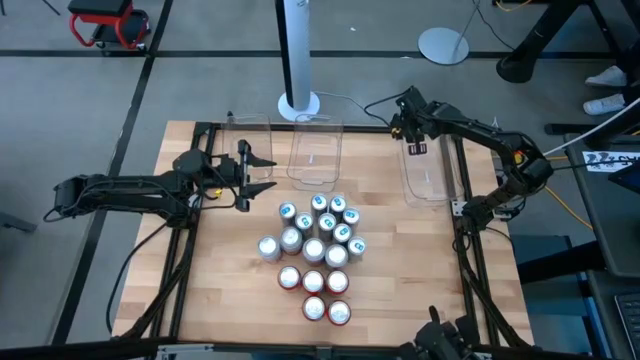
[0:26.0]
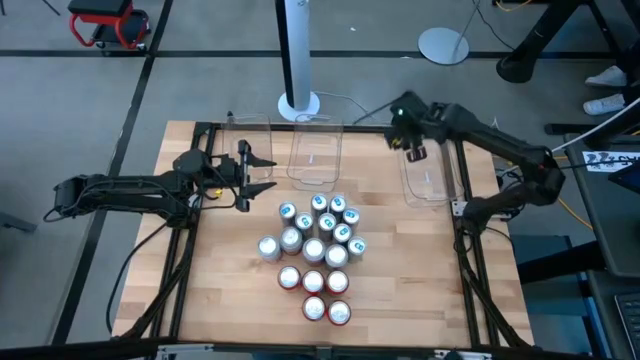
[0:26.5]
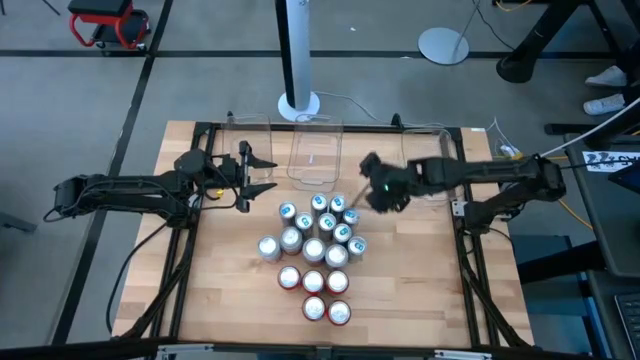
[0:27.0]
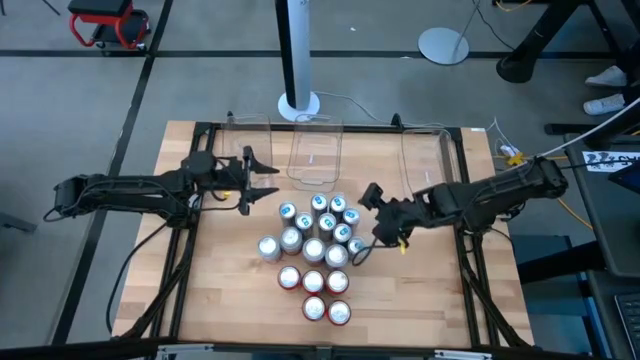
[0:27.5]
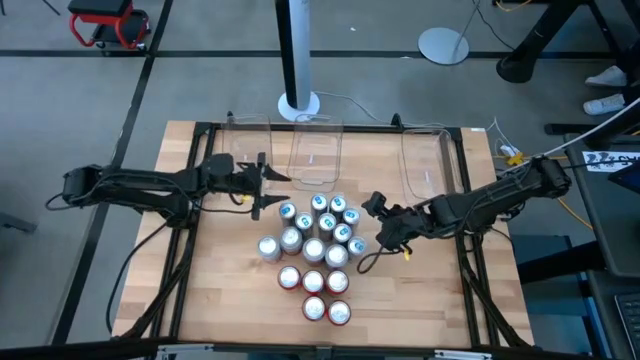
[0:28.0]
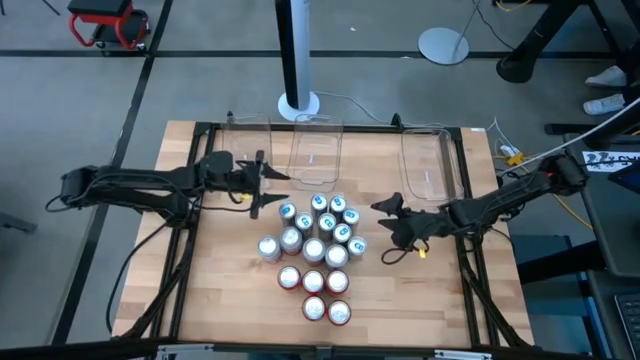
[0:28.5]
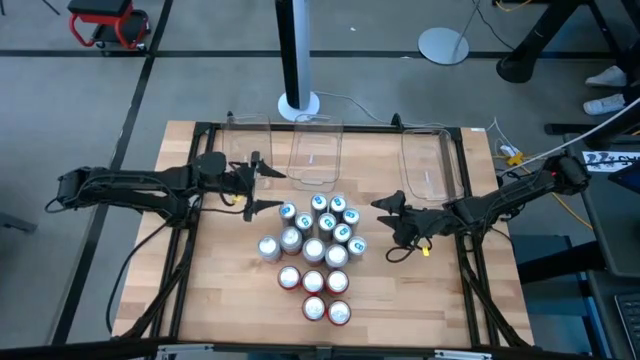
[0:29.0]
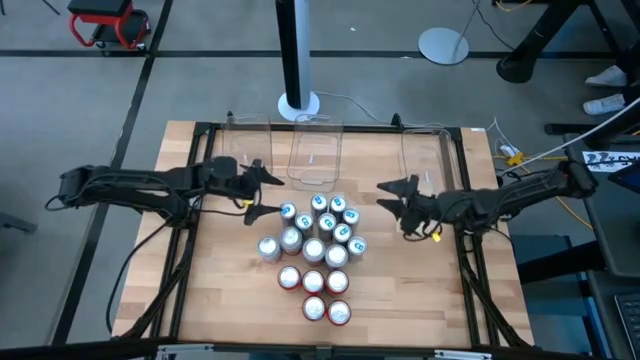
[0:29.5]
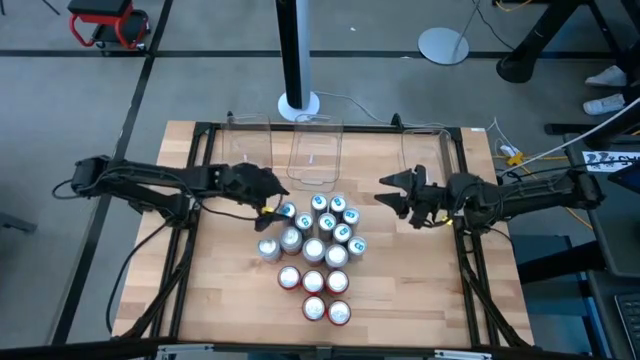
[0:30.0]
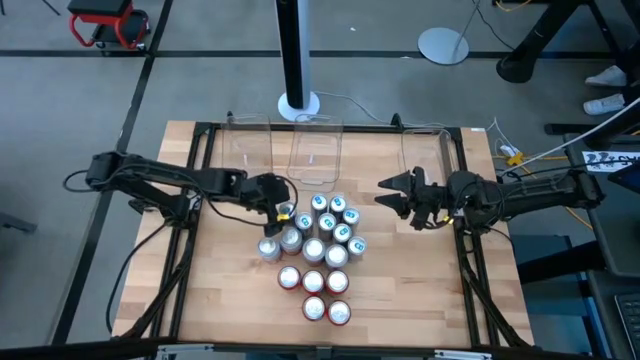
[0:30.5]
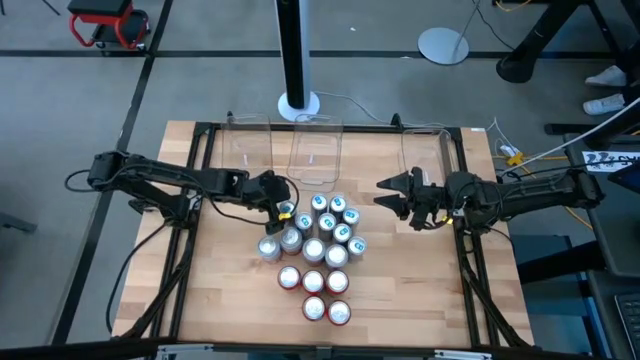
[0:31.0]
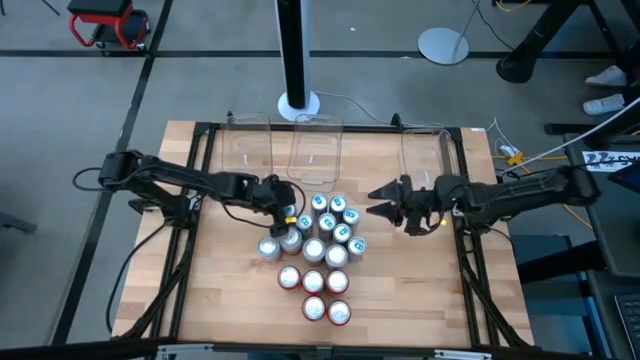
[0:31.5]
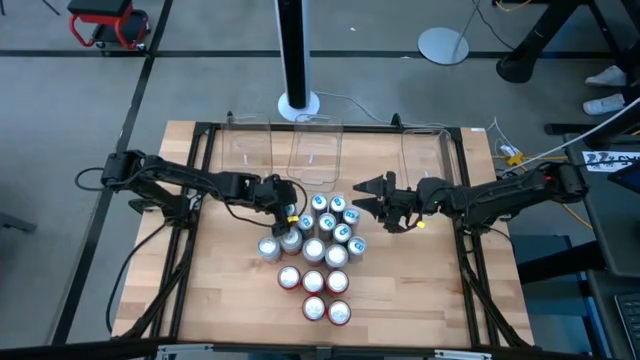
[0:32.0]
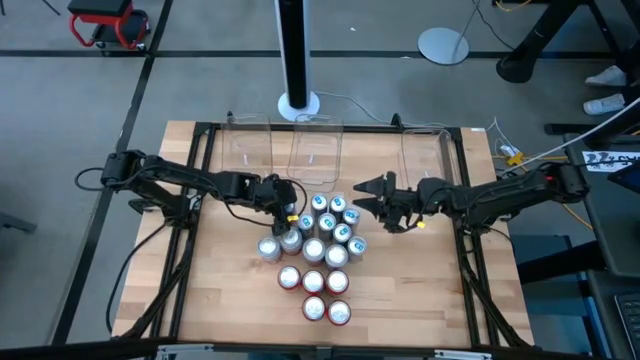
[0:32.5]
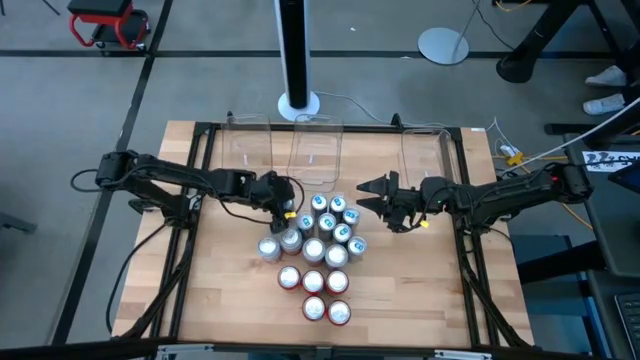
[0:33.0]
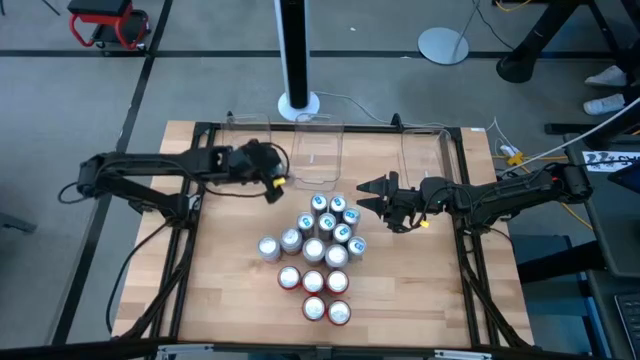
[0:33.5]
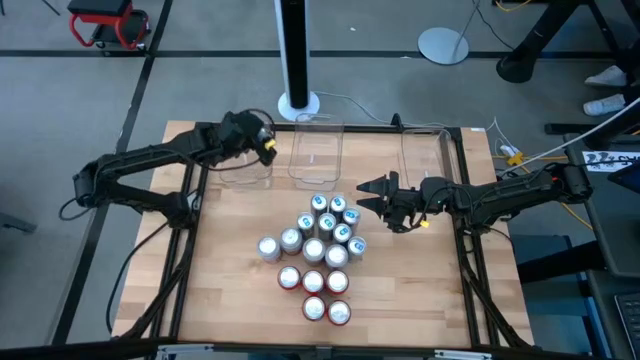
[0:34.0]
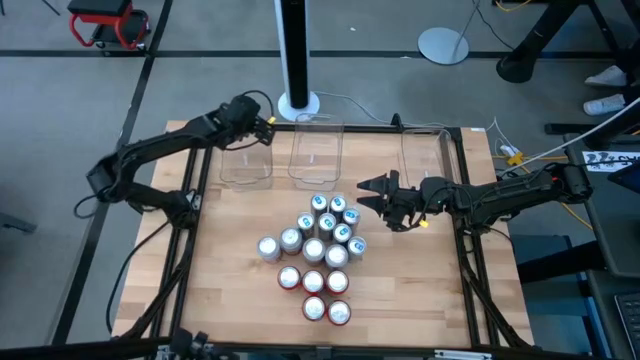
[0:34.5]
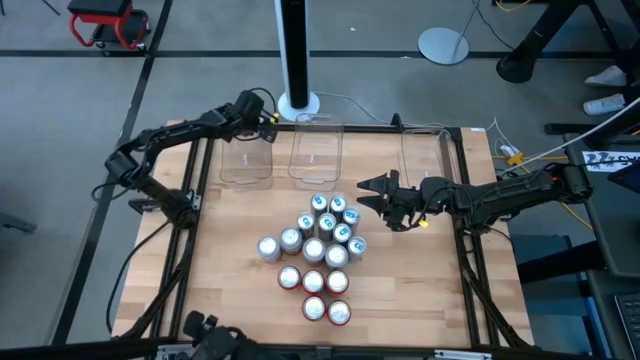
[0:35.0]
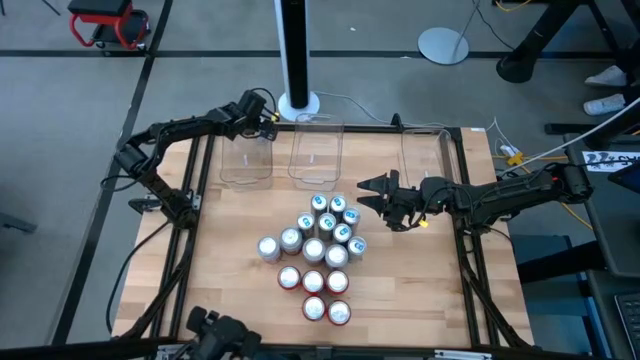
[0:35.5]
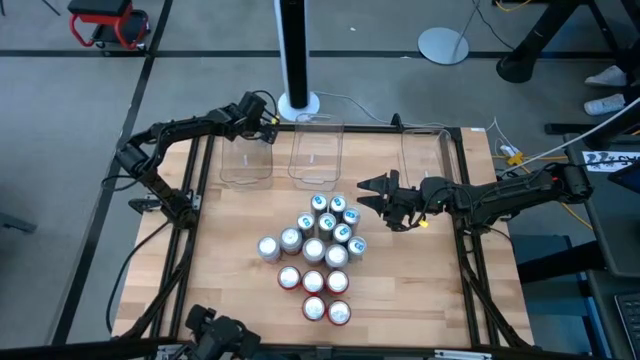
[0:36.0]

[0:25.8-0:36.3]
Task: Sort soda cans
Put the blue soda can into the left transparent bin

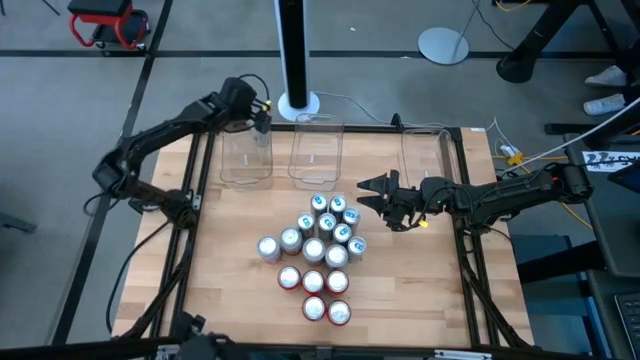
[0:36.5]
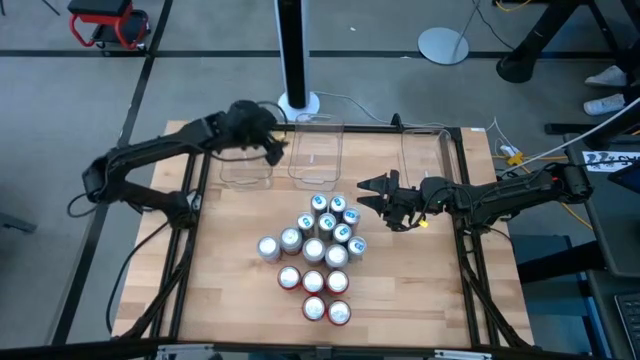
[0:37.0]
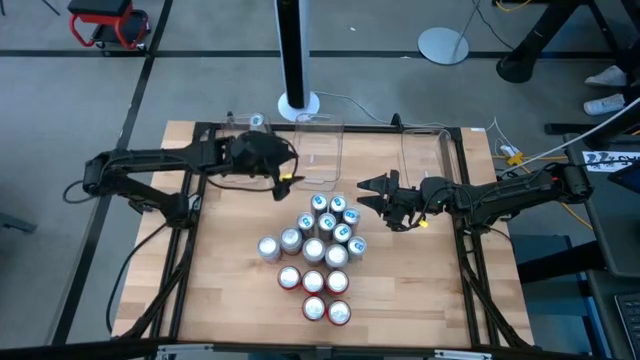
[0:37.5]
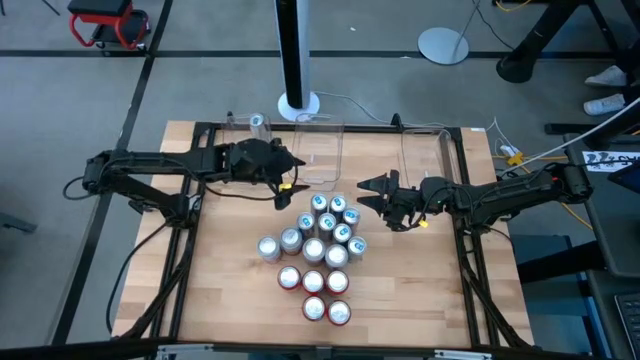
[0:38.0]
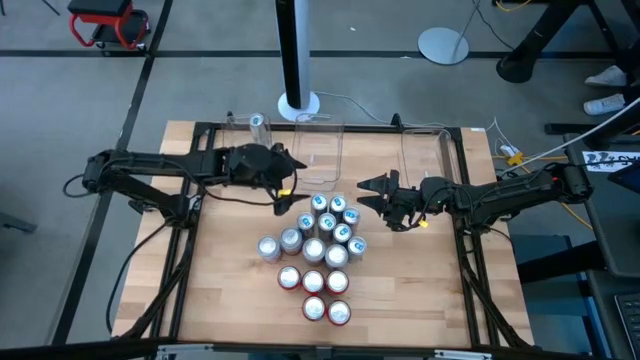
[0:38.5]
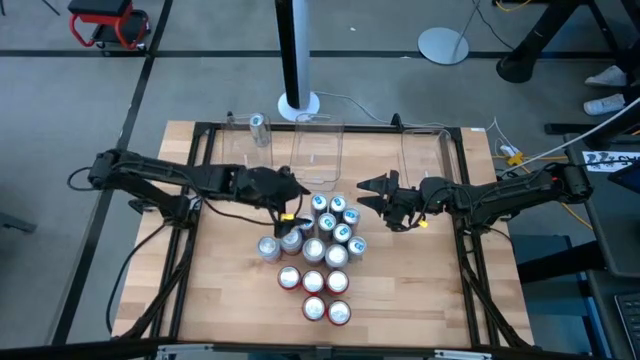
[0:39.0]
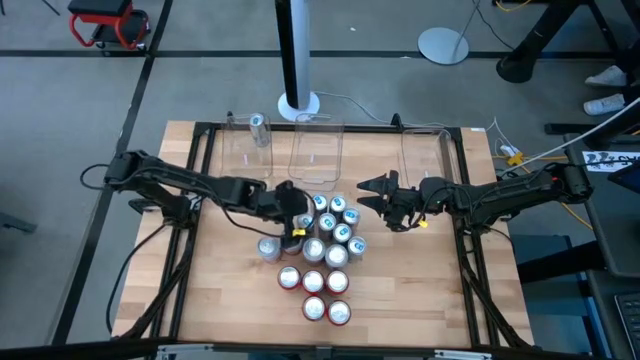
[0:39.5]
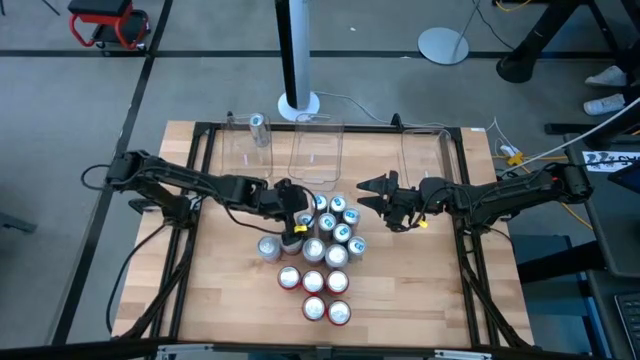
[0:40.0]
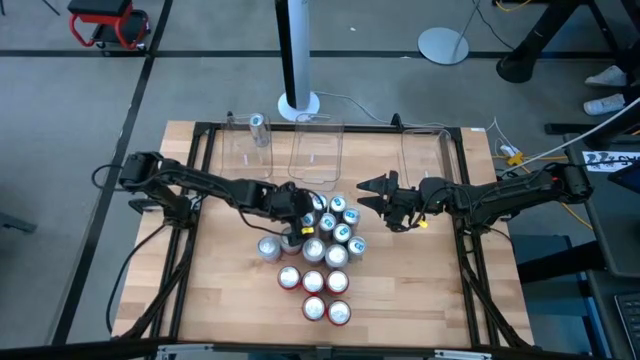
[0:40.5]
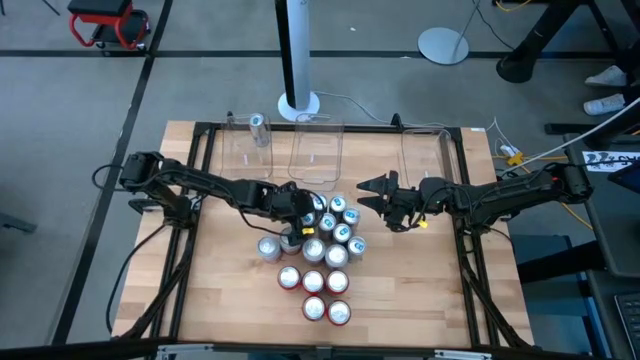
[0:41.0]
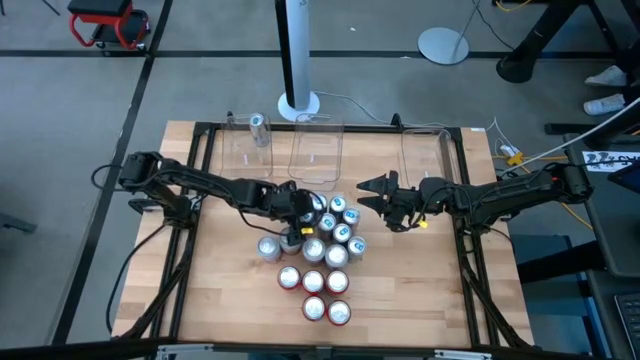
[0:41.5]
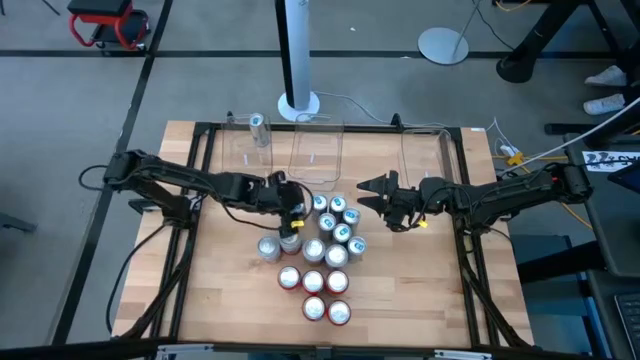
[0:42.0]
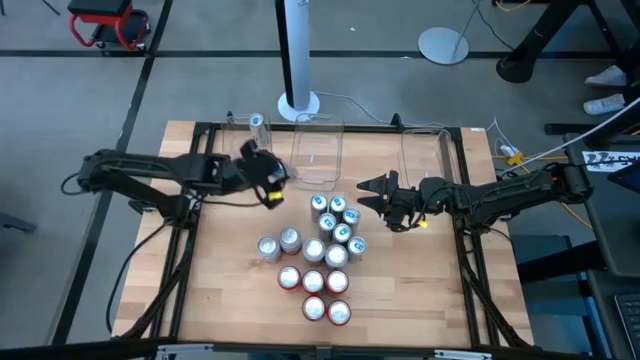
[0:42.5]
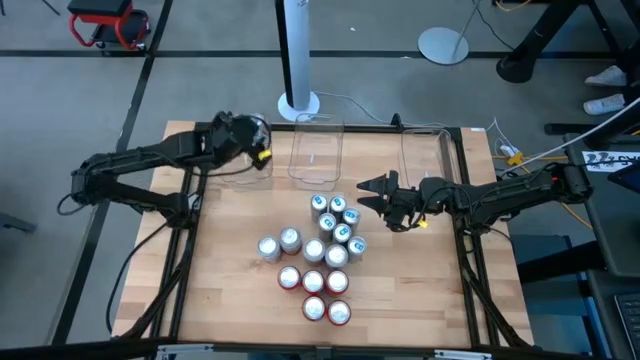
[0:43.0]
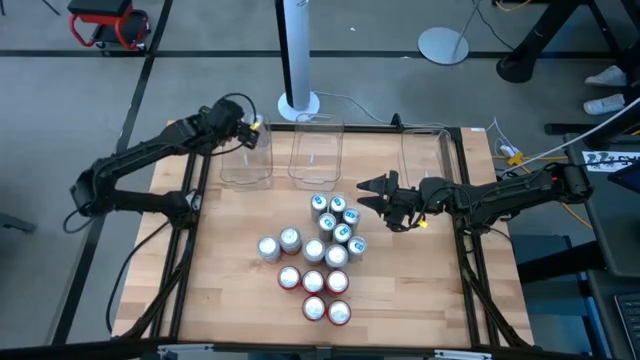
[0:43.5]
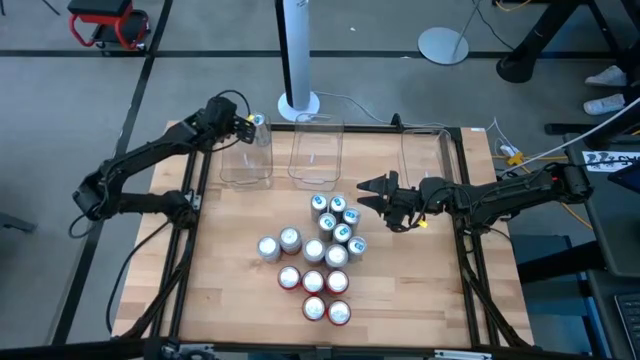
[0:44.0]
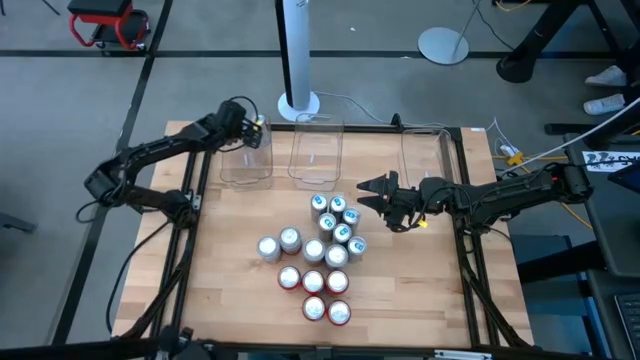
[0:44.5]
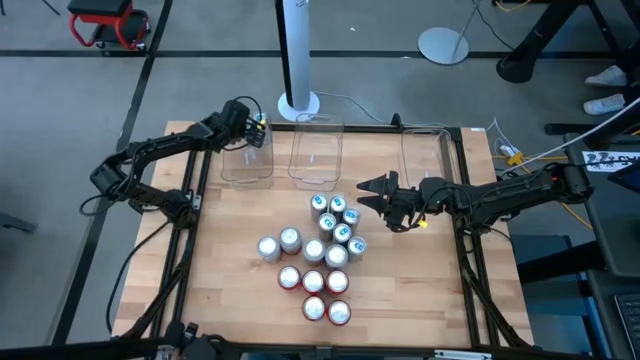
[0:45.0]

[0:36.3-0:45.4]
Put the blue soda can into the left transparent bin

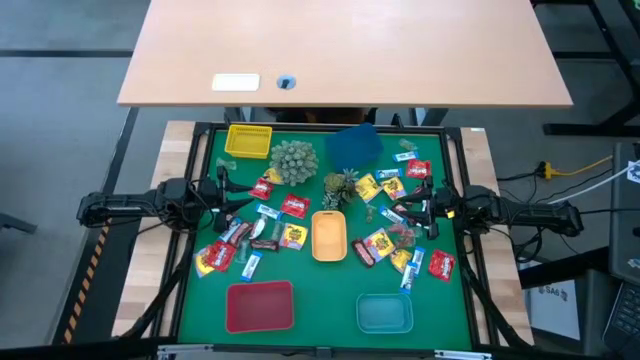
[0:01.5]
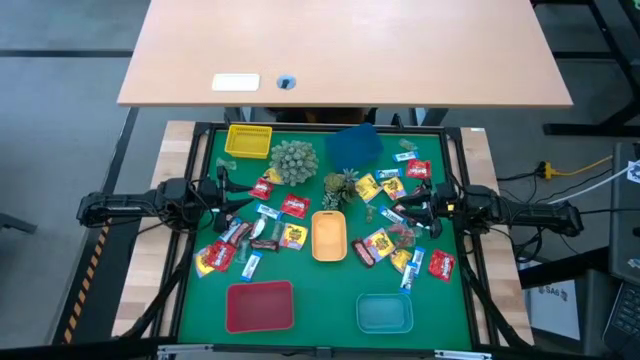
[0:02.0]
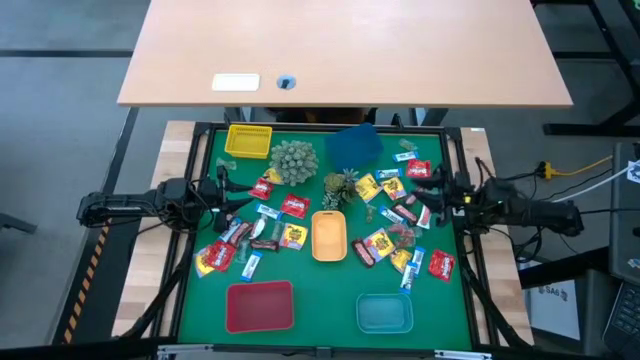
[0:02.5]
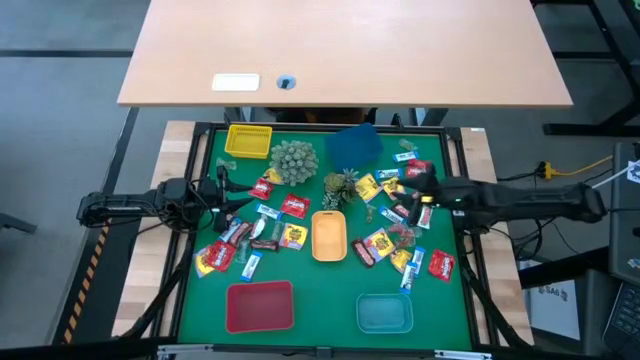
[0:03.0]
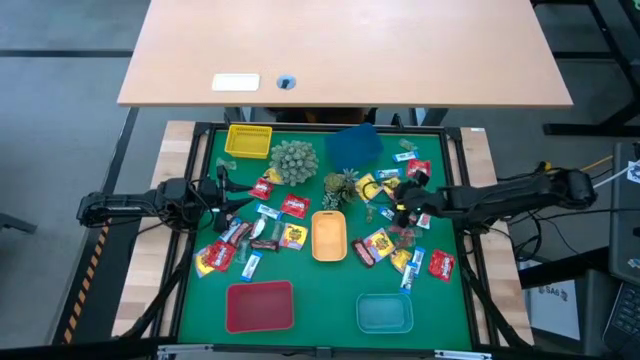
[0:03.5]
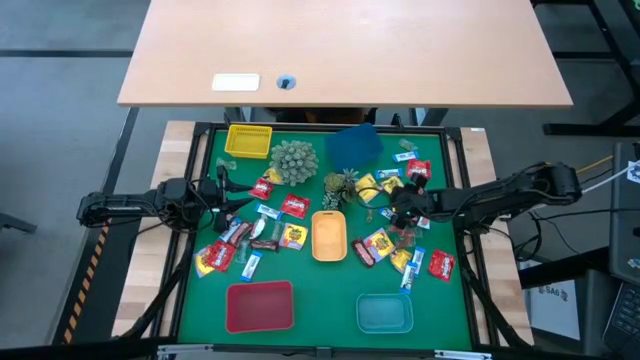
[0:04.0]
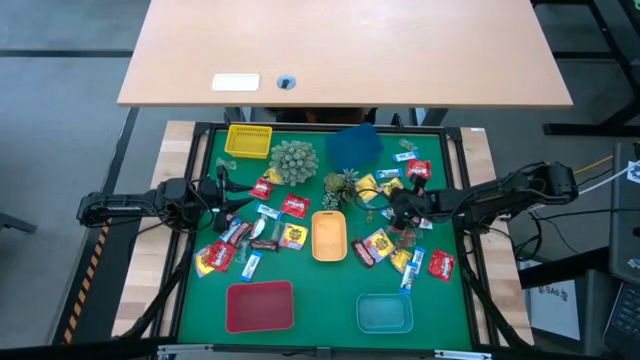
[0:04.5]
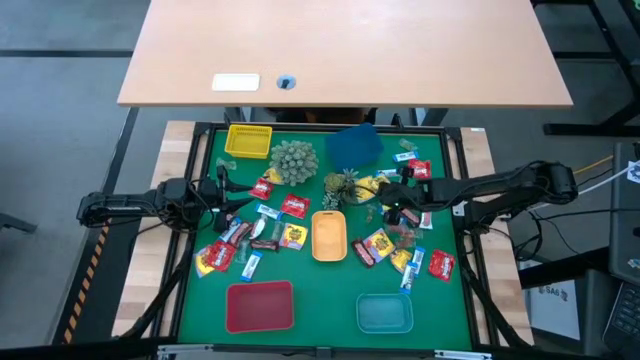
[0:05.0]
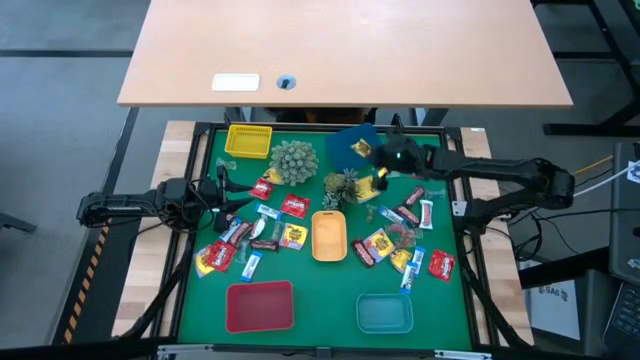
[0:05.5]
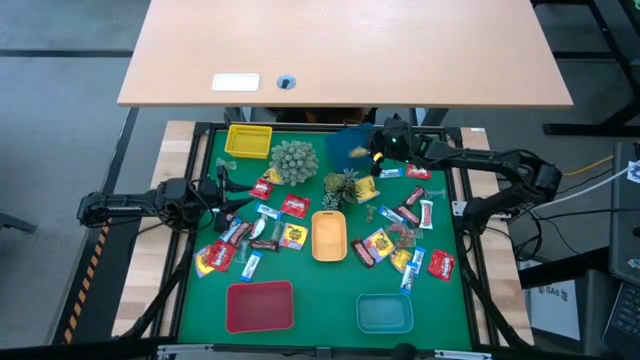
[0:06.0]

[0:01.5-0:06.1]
Task: Sort candy
Put the yellow candy into the blue bin
